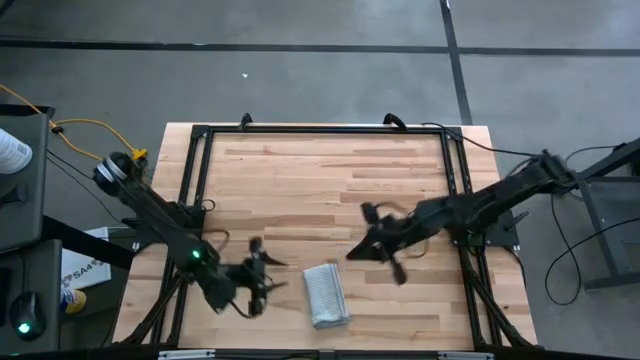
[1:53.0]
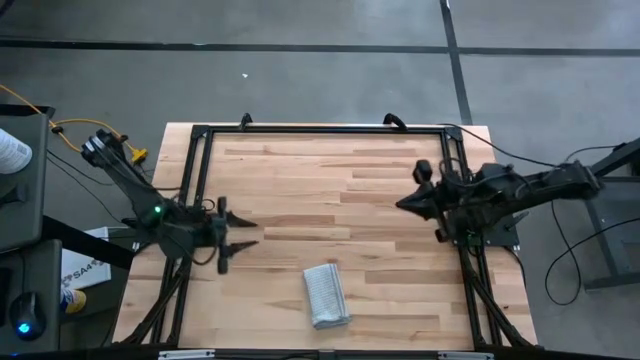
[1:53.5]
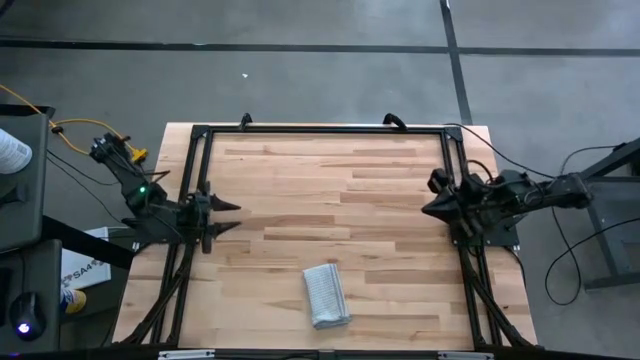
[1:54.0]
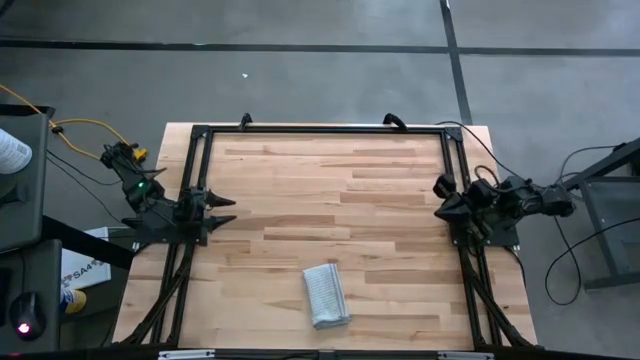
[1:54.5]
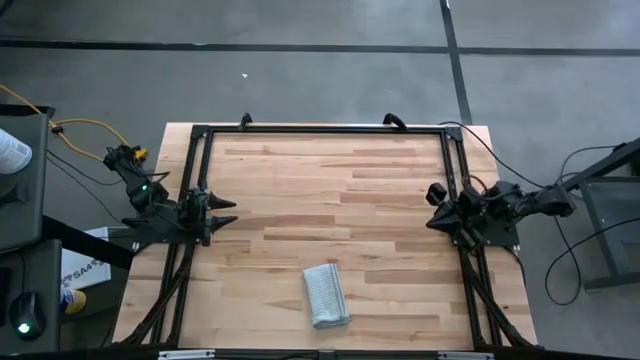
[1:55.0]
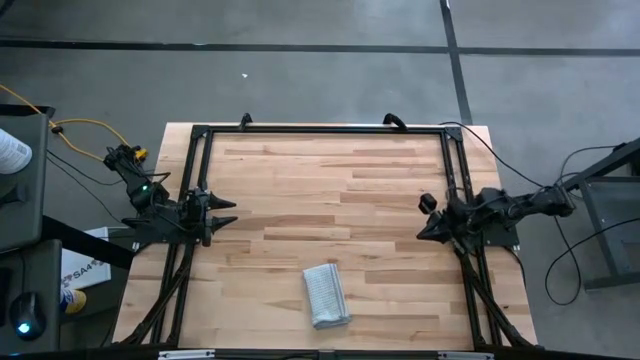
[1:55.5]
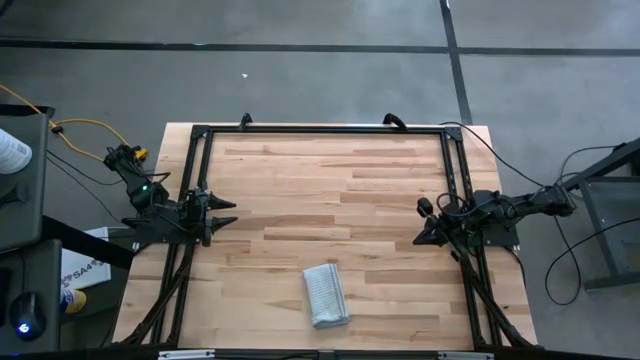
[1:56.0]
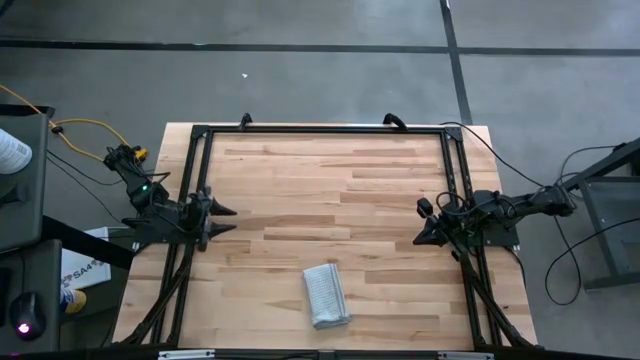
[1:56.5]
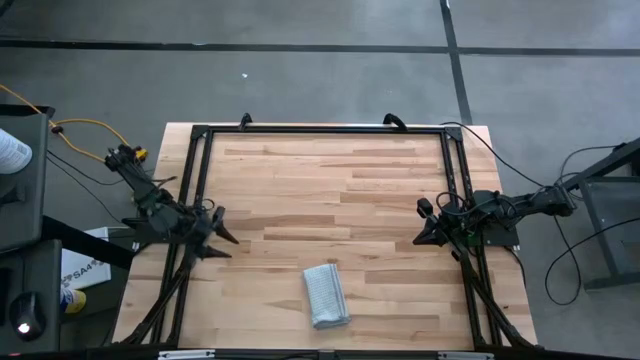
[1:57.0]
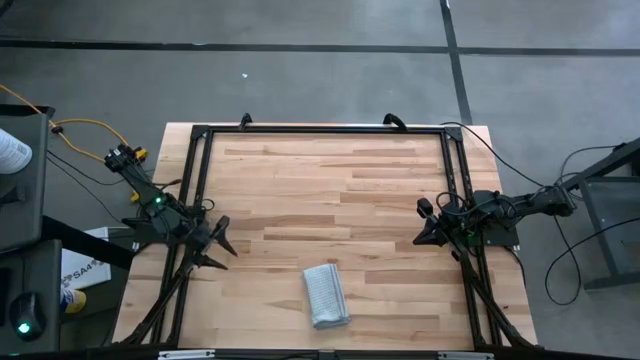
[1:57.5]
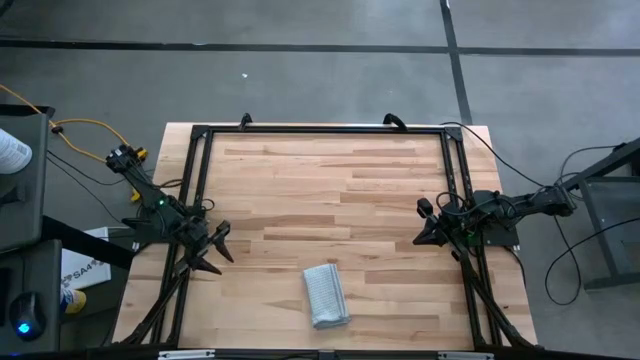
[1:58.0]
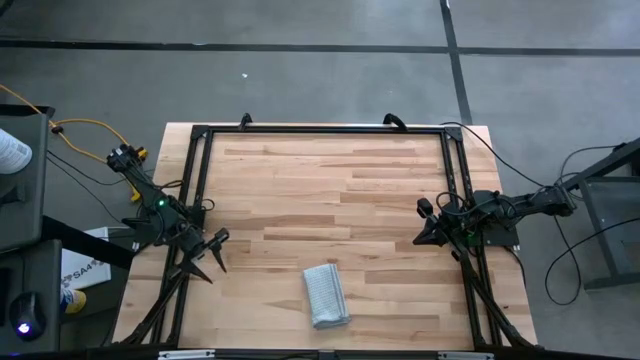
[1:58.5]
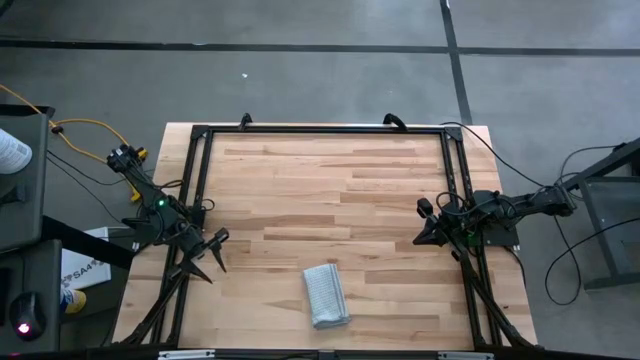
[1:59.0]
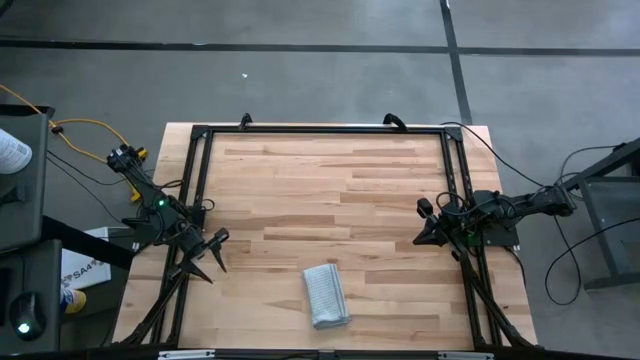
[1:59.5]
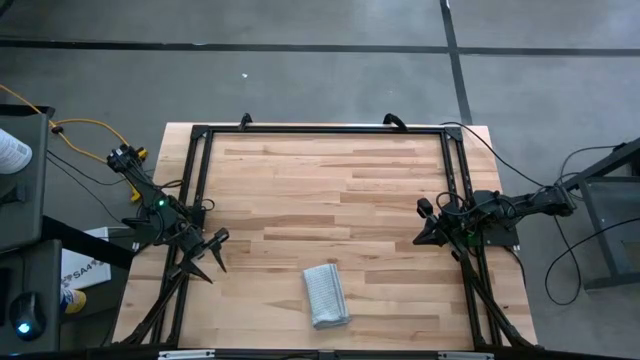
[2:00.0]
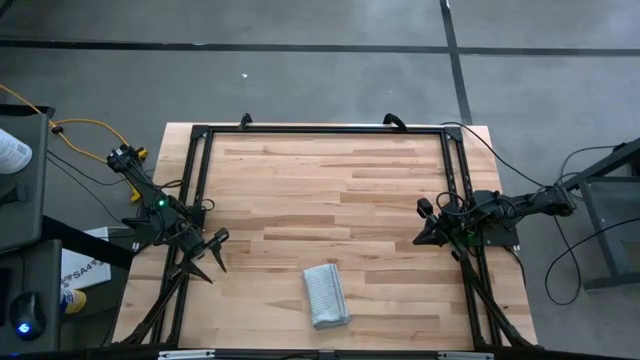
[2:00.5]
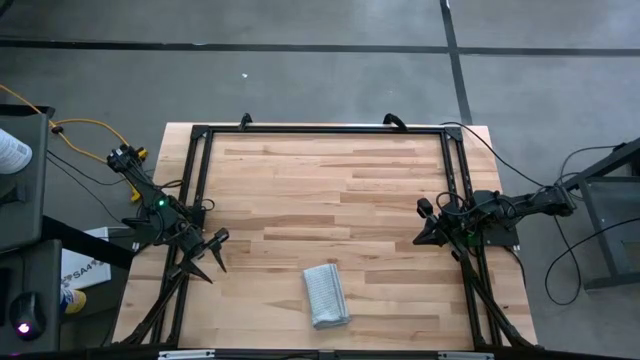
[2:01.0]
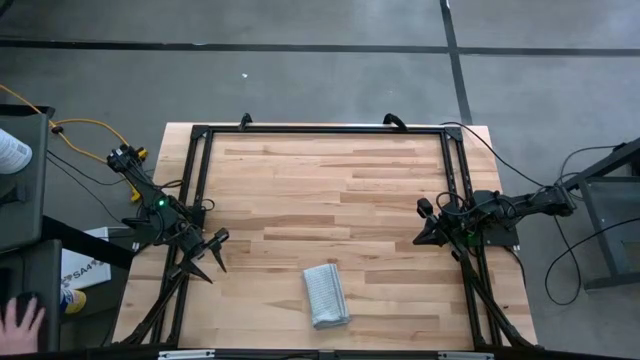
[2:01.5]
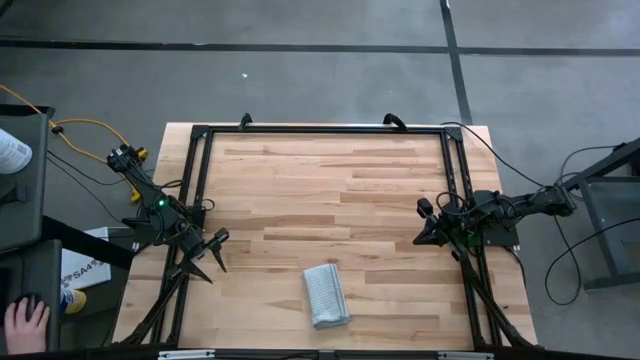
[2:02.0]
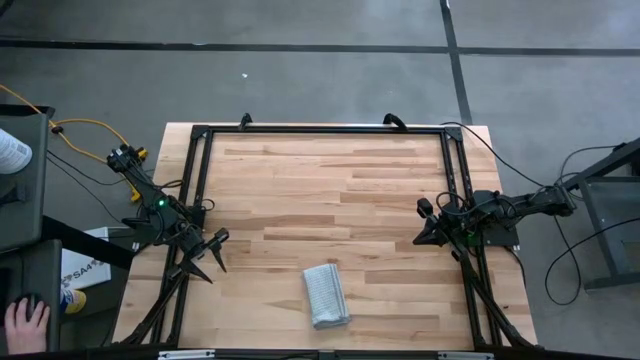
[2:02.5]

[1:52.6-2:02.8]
Task: Fold microfiber towels
Return to Home Position

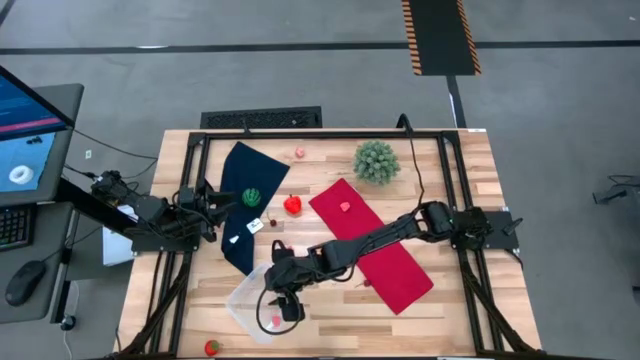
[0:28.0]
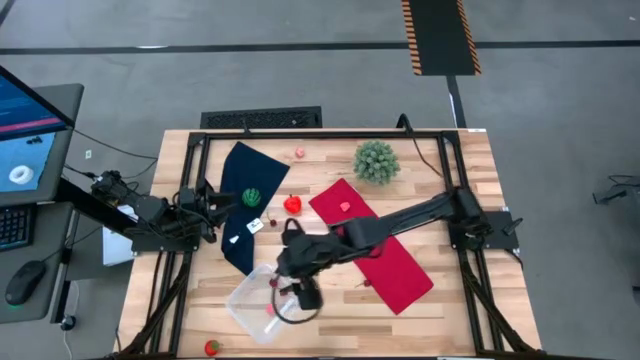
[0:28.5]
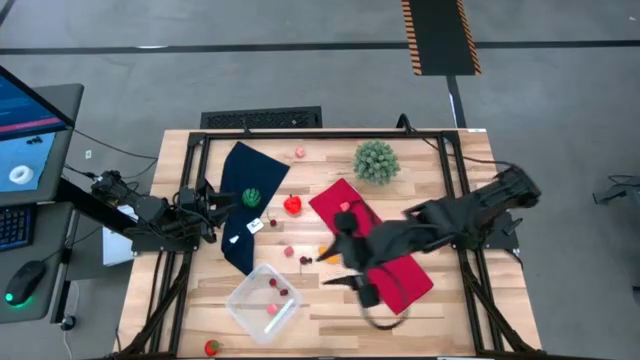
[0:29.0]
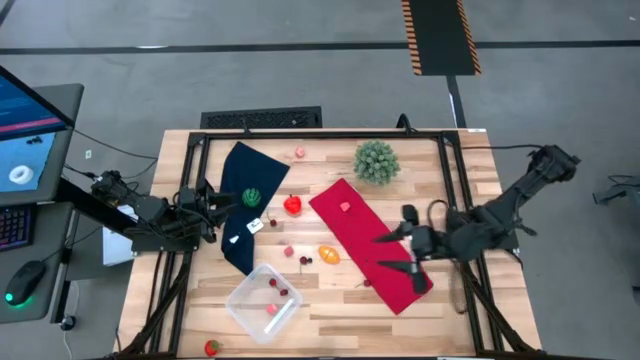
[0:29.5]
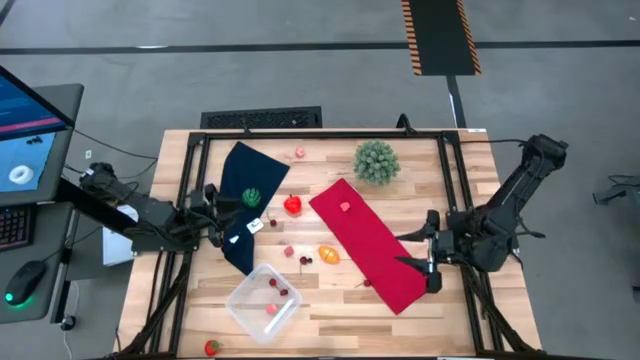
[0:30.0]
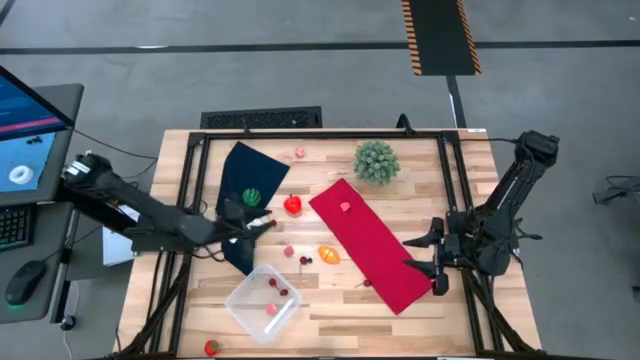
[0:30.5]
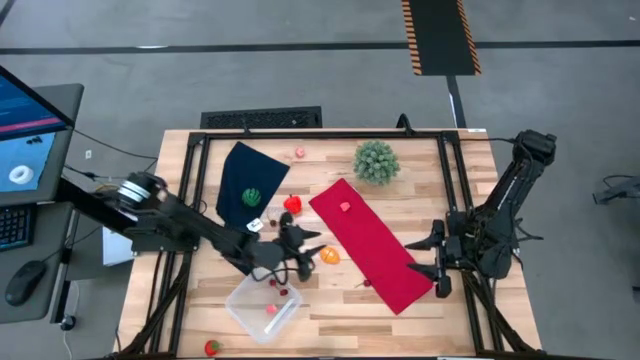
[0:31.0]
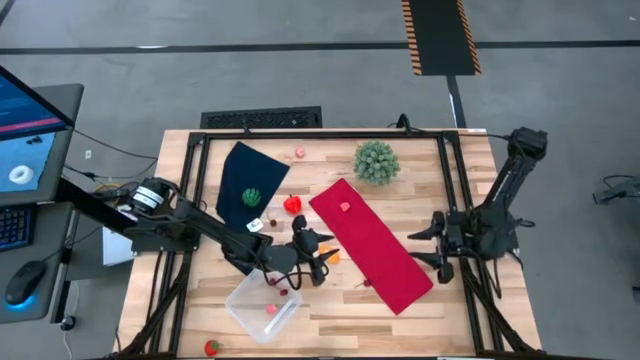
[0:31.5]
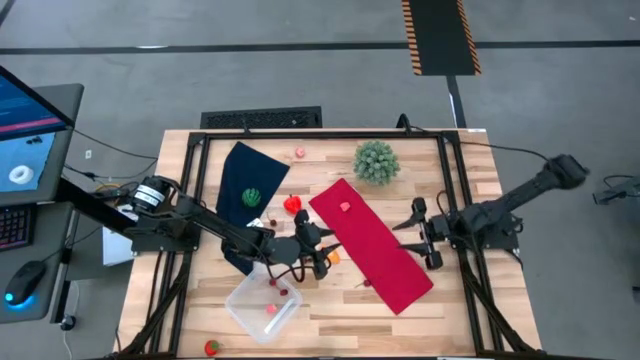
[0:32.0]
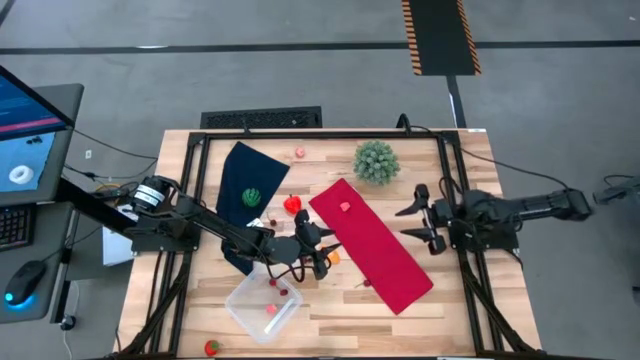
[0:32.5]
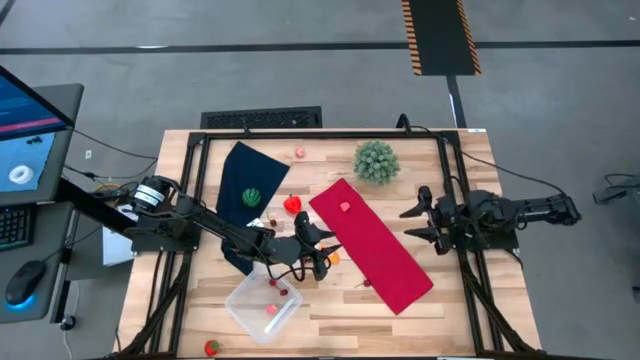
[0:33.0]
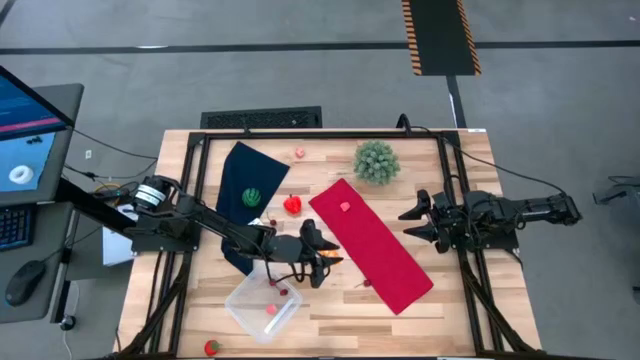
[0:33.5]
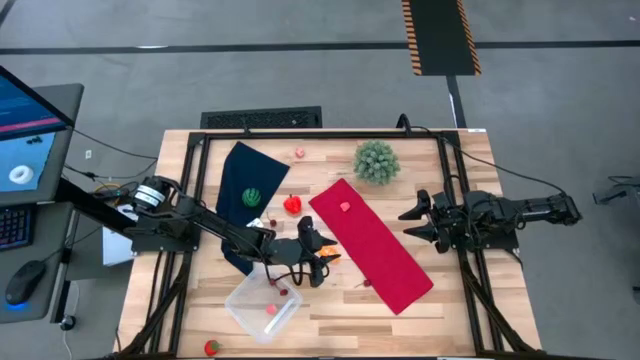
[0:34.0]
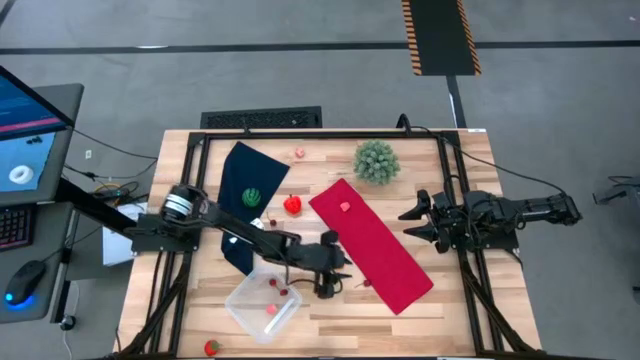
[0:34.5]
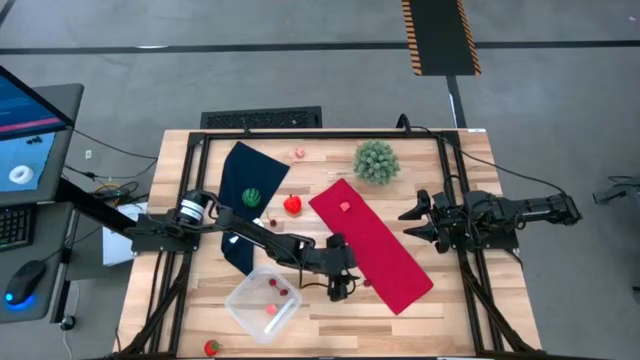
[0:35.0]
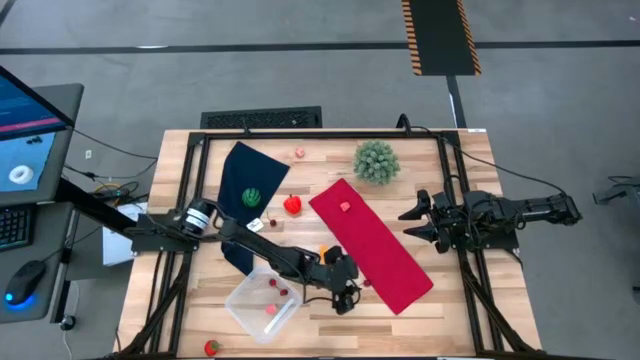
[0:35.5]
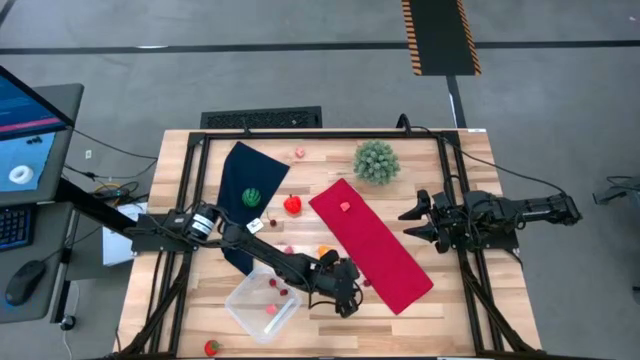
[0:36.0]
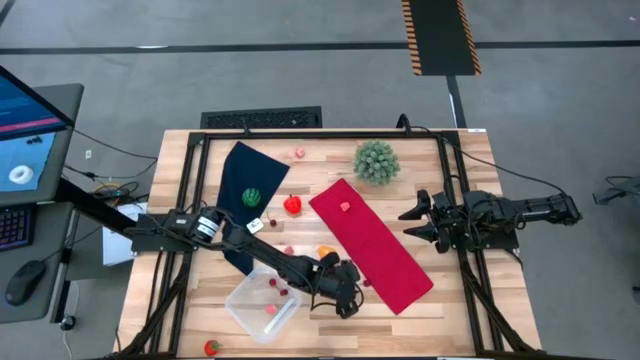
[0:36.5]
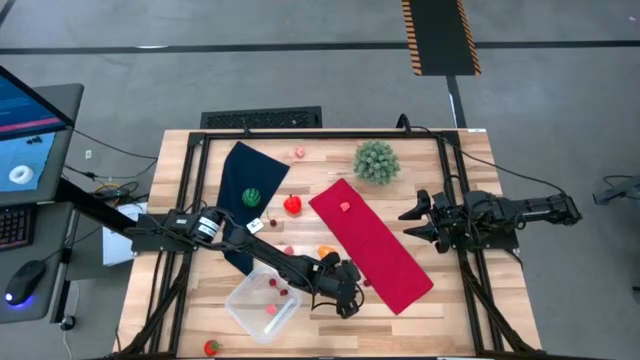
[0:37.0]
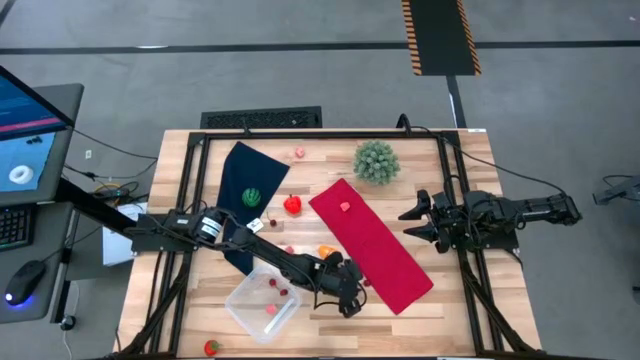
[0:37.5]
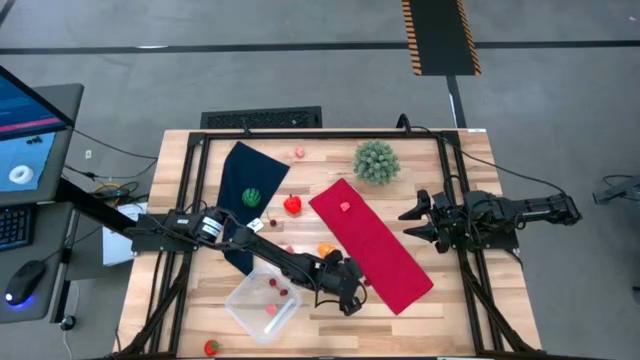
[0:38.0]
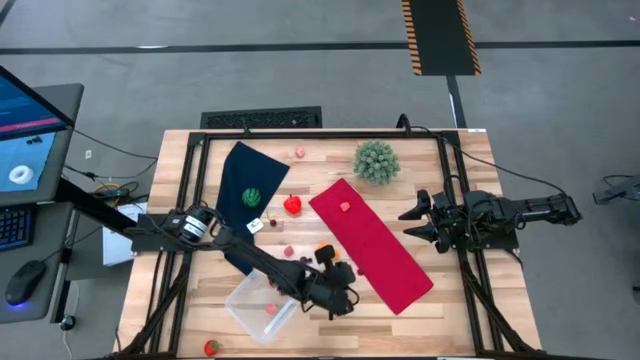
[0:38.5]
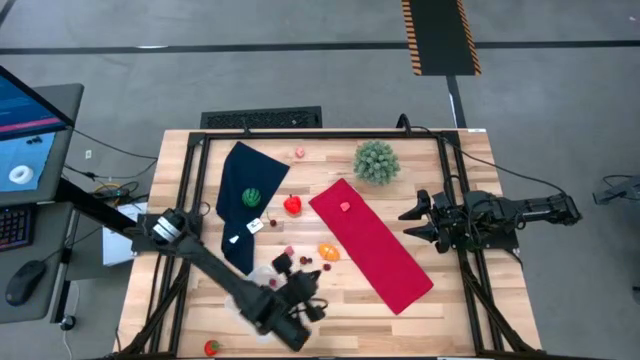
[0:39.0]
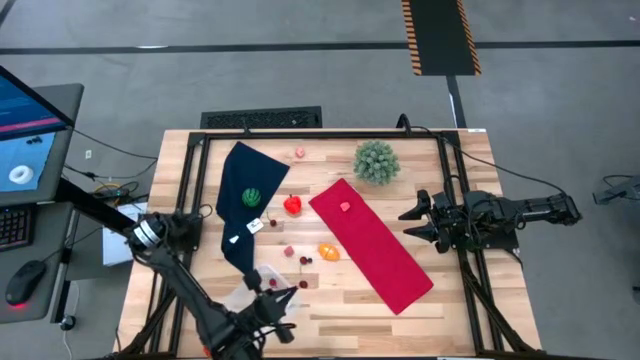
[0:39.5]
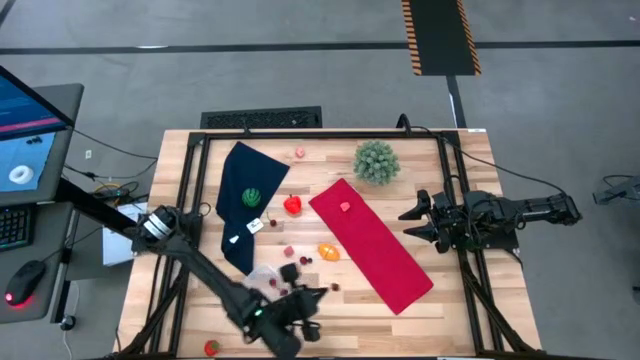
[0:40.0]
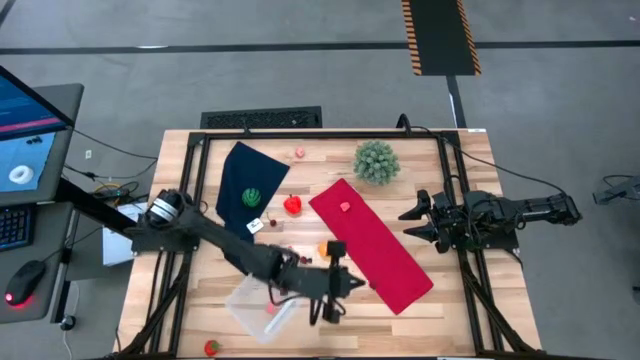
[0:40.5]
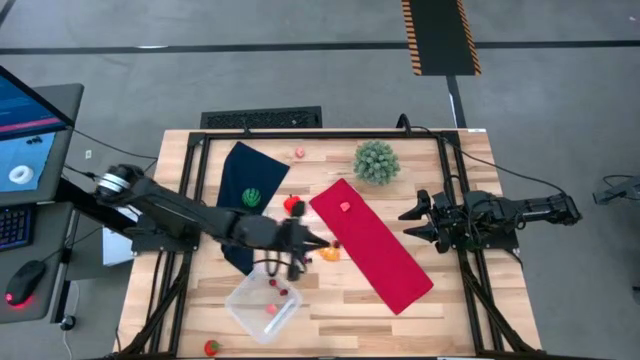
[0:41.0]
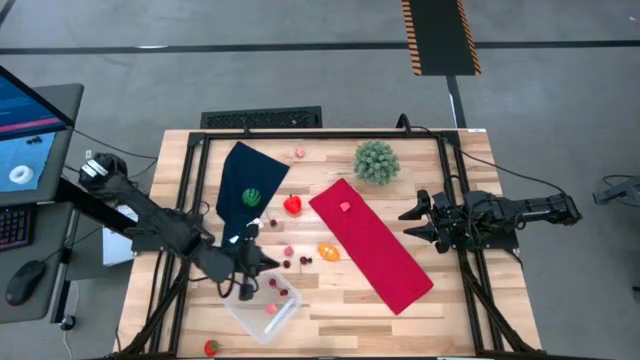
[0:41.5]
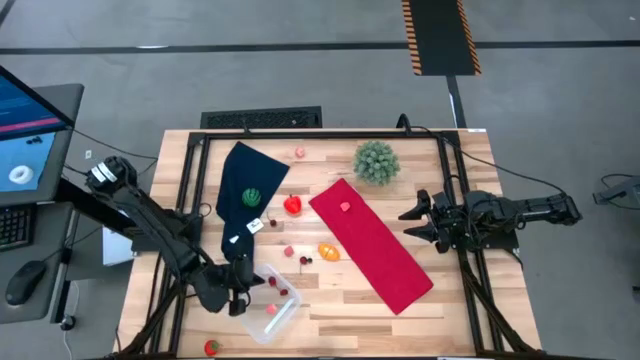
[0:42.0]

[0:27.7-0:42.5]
Task: Pick and placing Produce into tupperware
Put the cherry into the transparent bin
